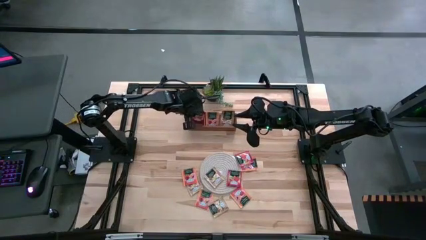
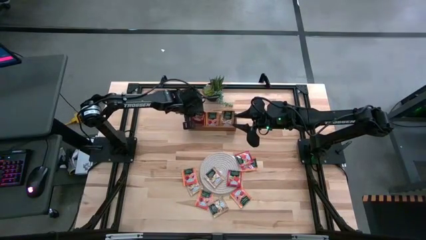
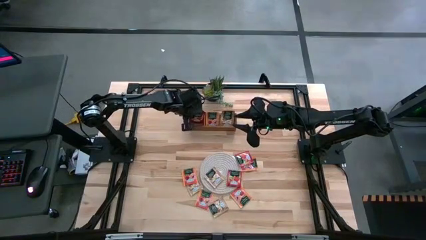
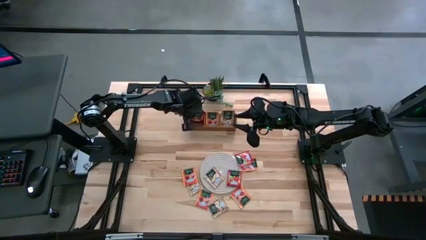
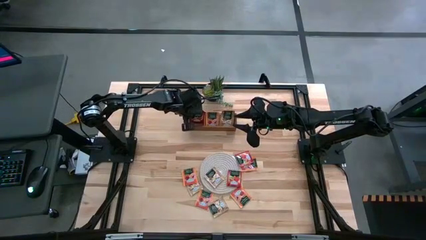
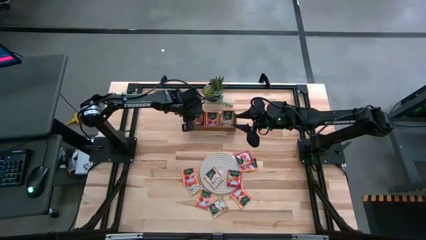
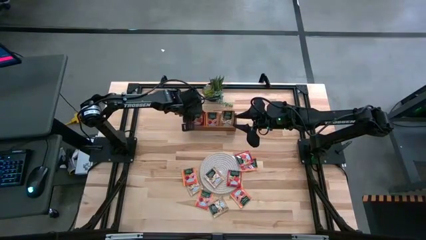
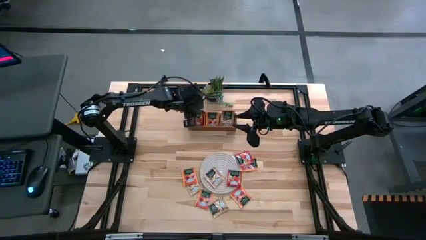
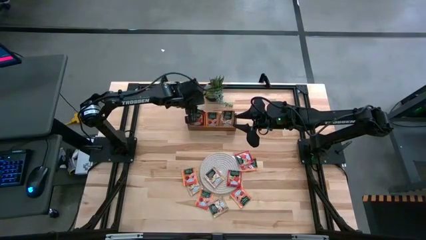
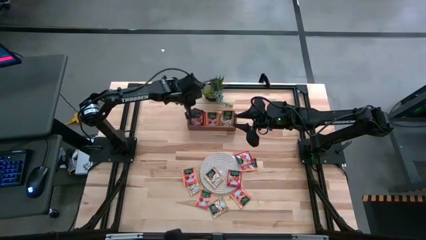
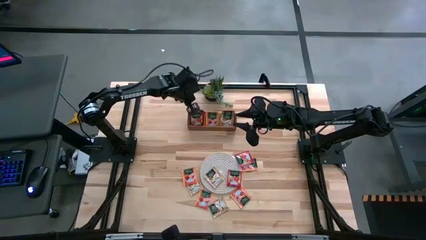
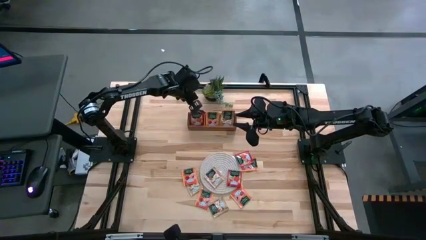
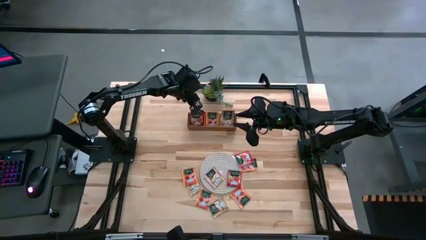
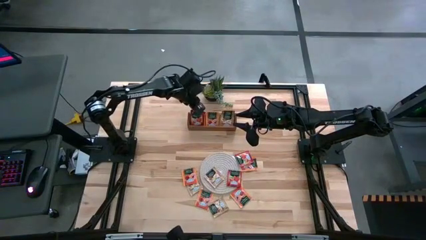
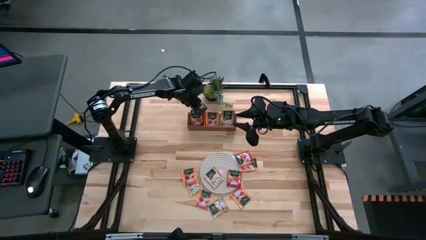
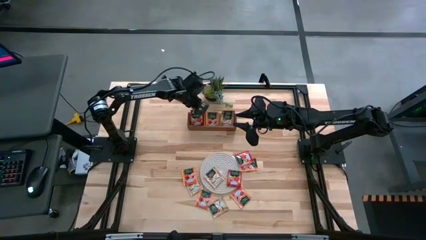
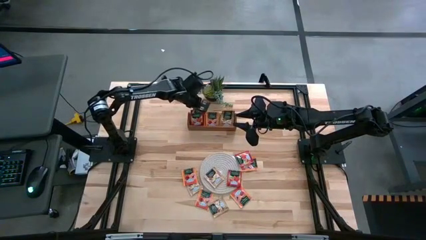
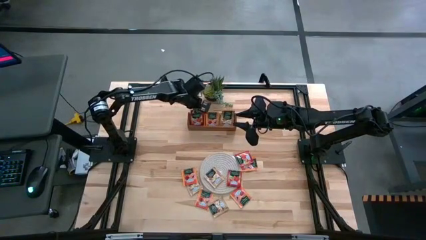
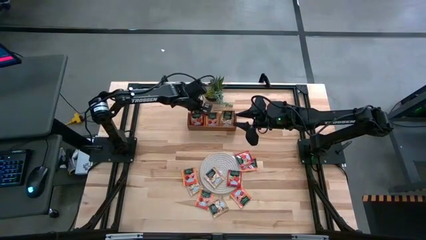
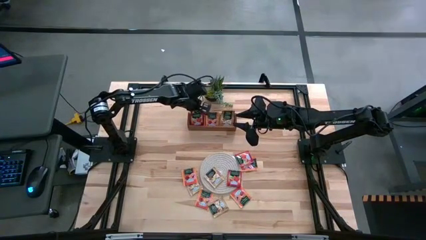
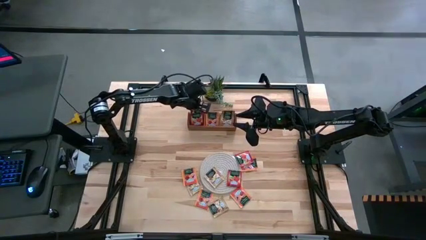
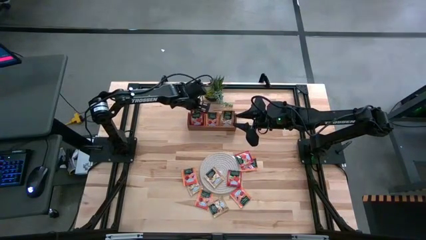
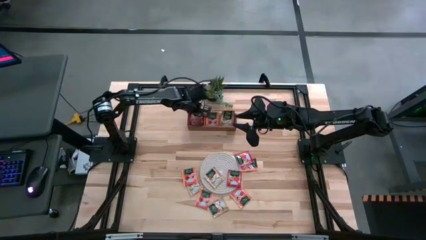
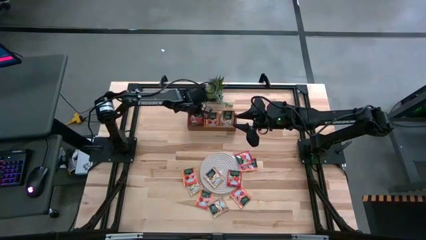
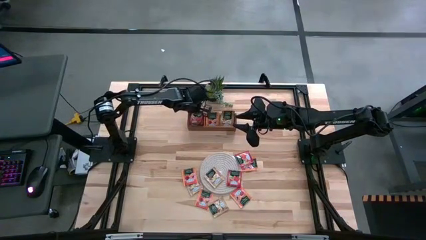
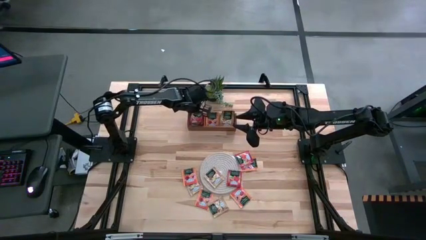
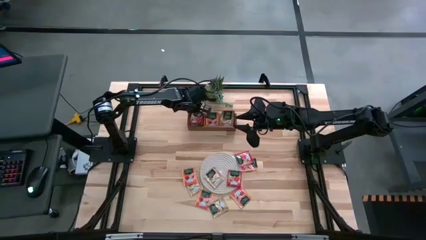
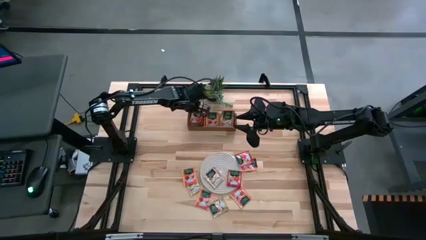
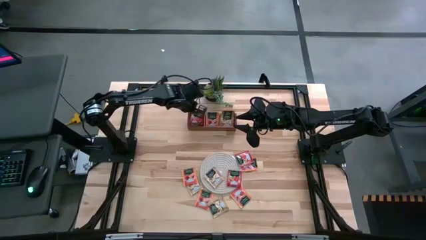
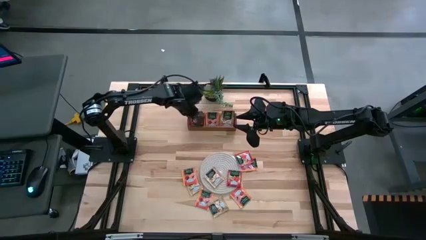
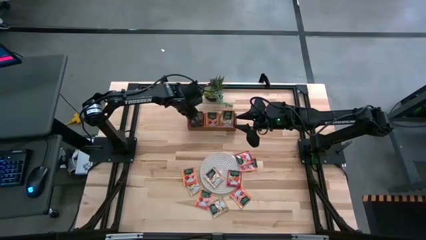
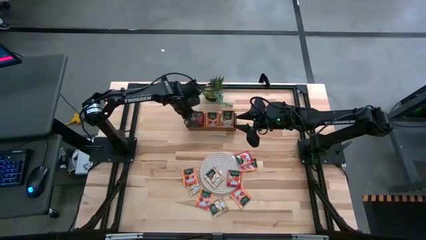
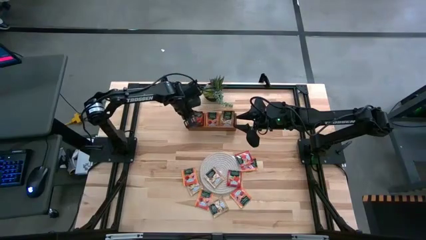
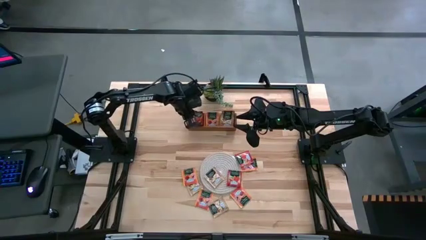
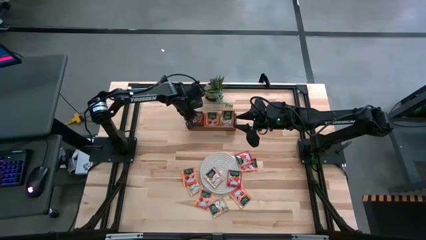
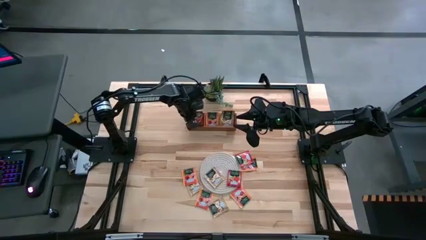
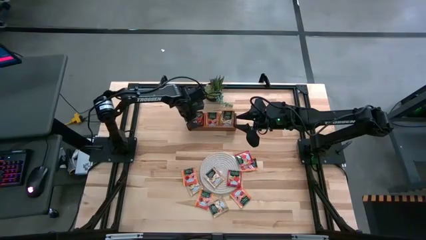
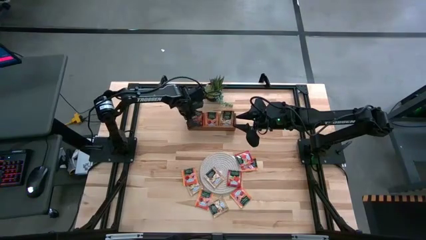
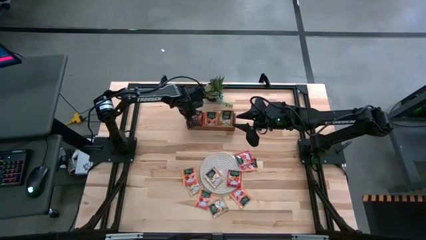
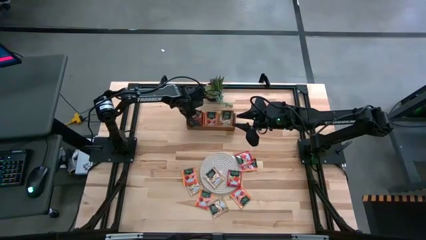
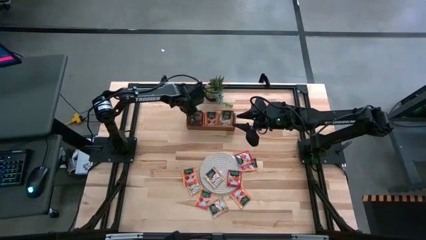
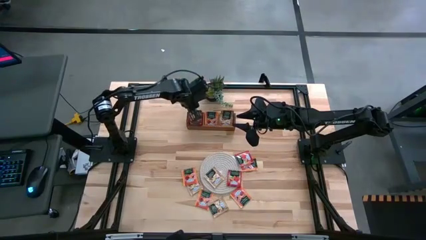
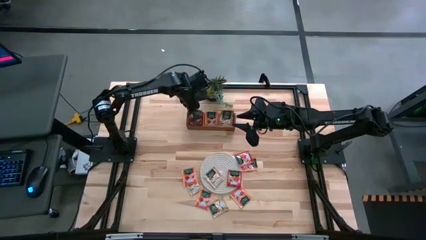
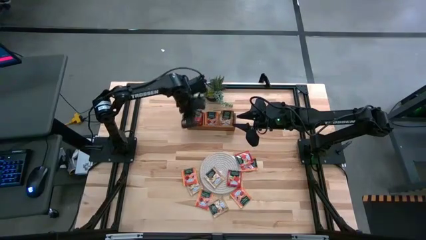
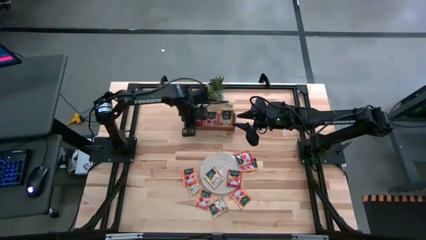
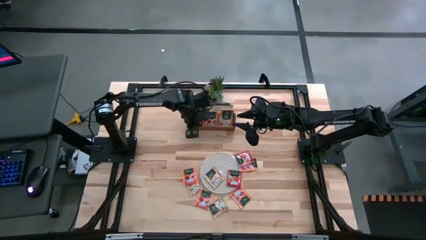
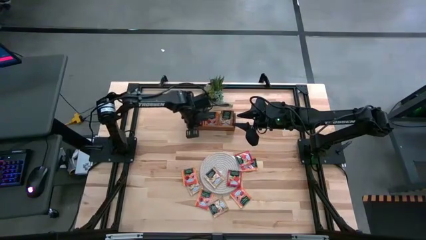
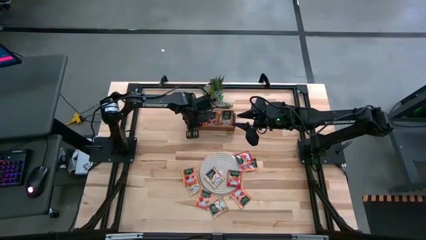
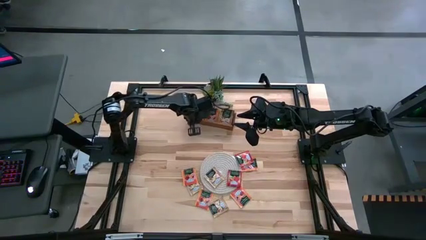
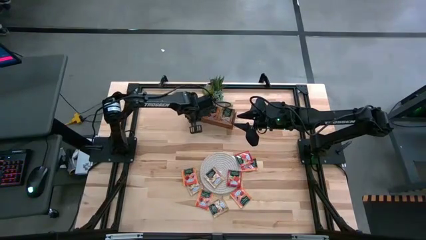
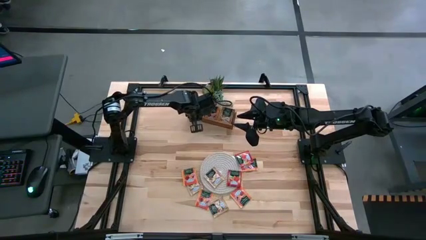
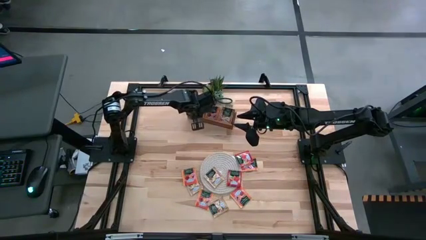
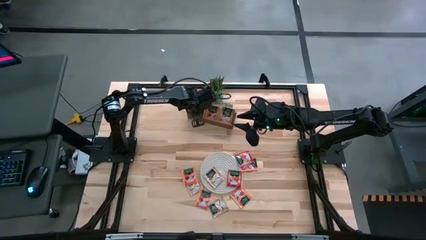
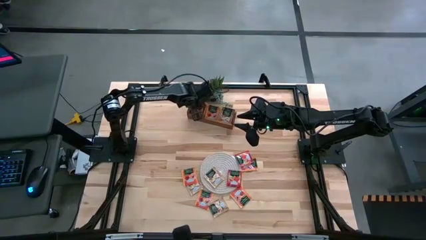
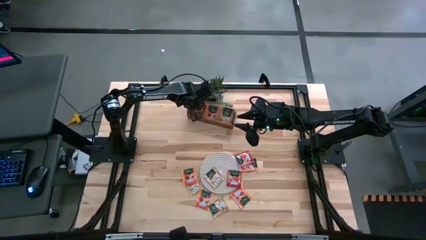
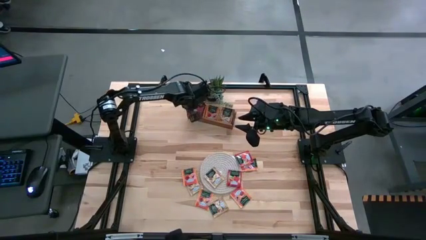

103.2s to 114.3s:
Task: Pick & Place Tea
Put the red tea bag into the left section of the wooden organizer

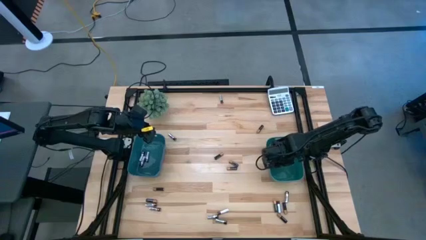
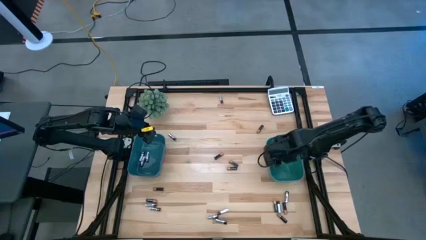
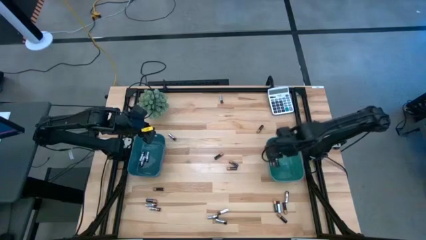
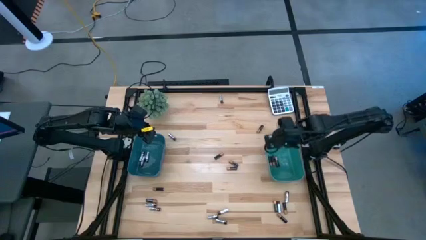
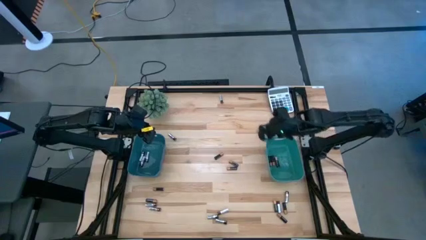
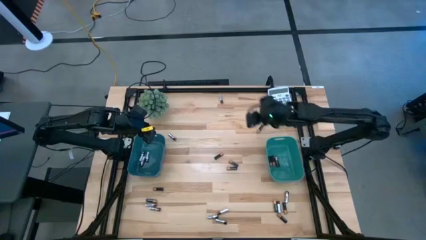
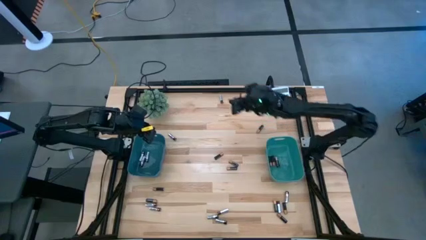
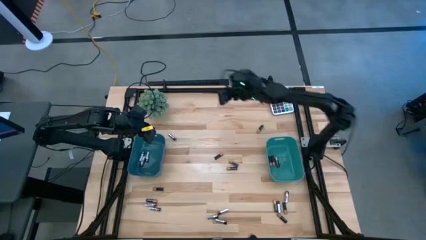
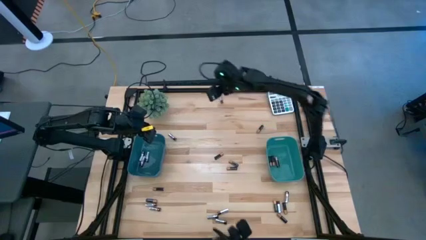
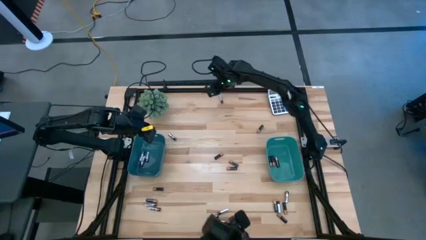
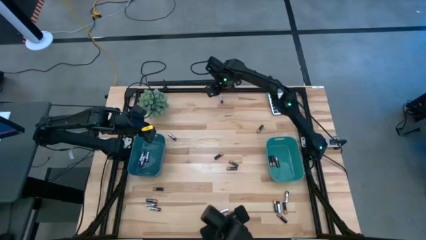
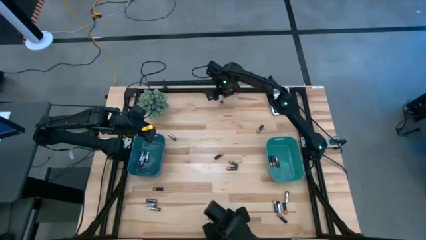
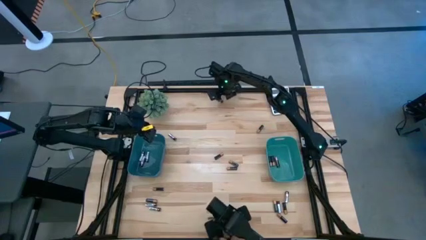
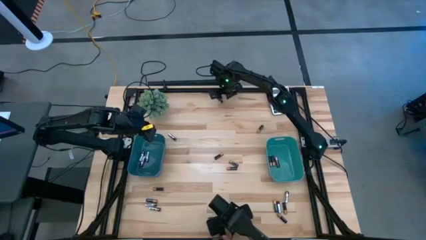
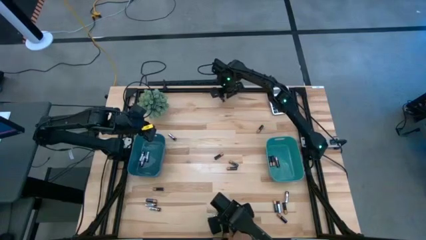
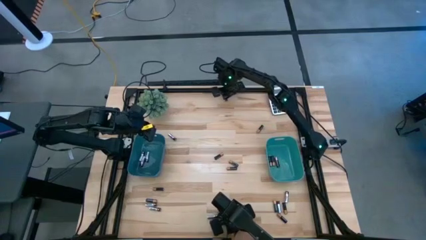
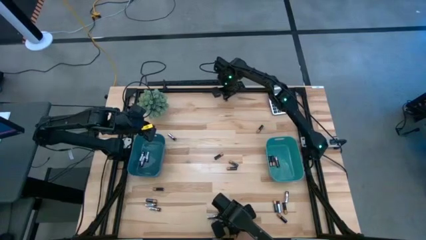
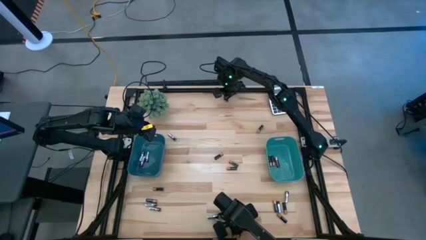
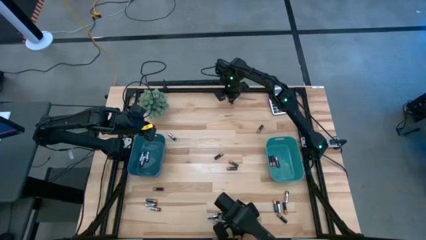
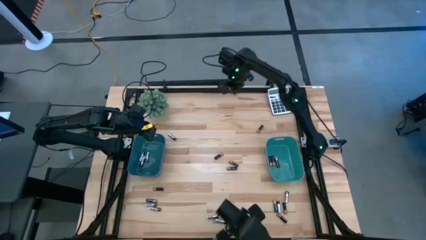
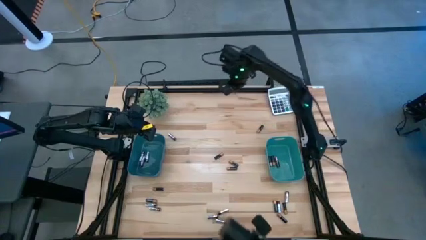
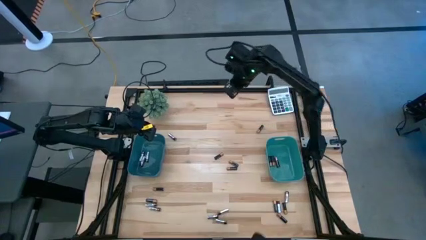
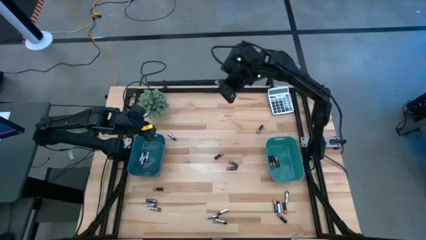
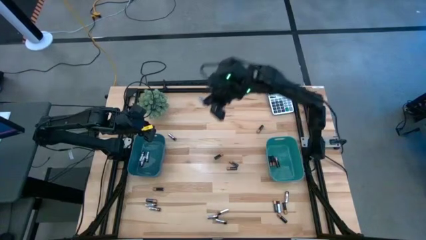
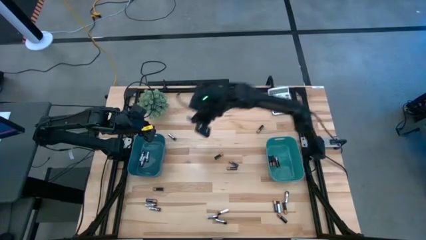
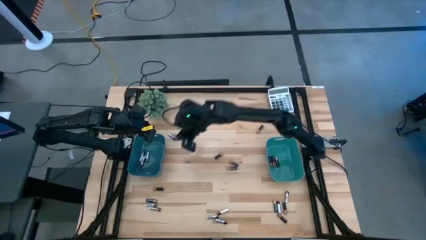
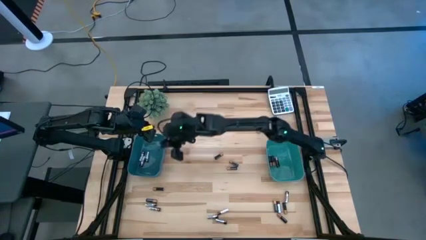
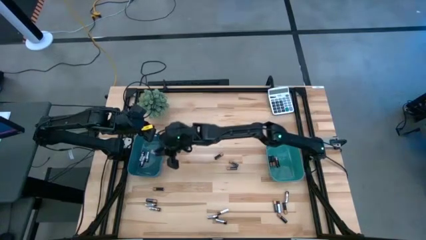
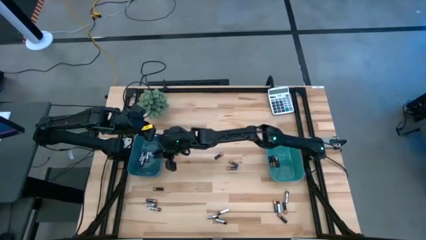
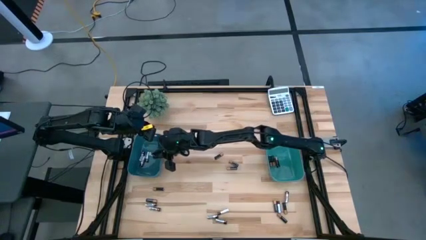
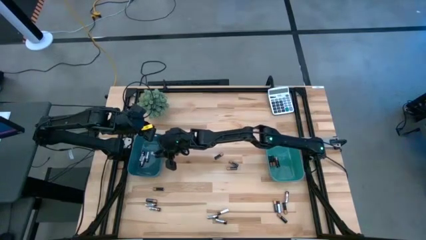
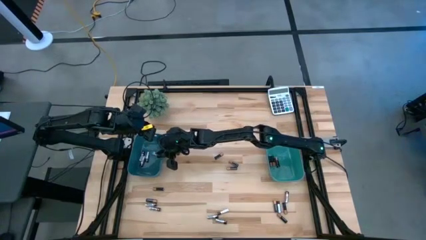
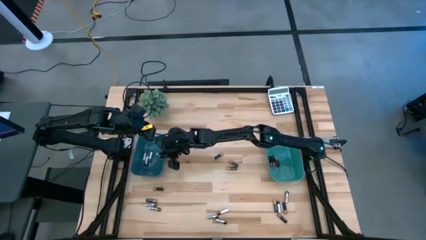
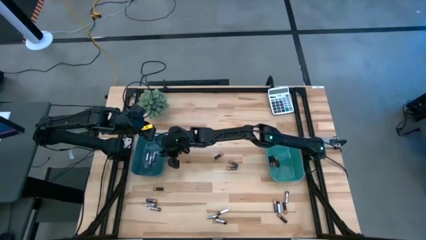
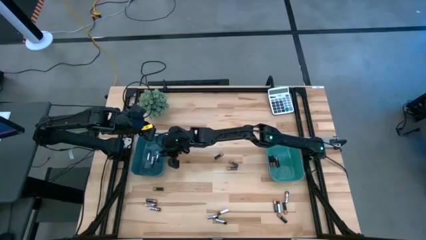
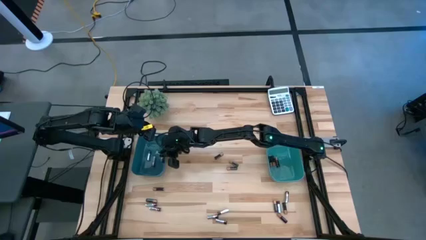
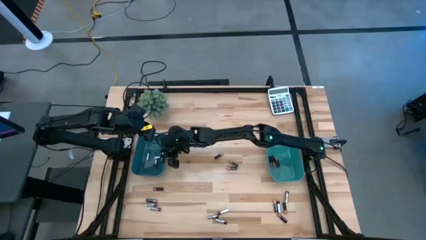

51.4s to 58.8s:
Task: Sort batteries
Put the silver battery into the blue bin
